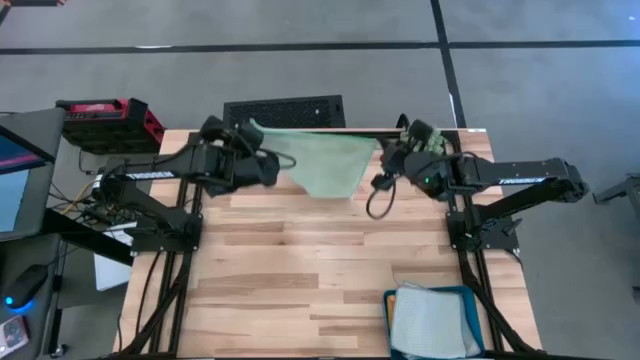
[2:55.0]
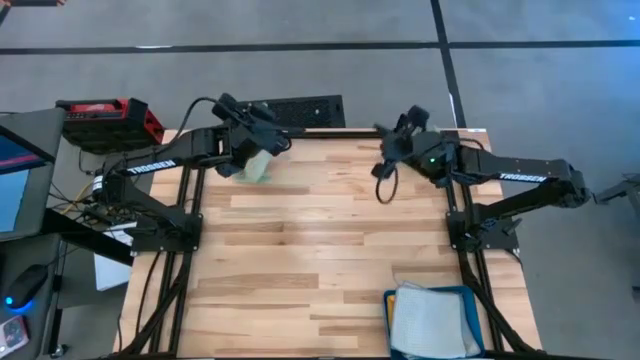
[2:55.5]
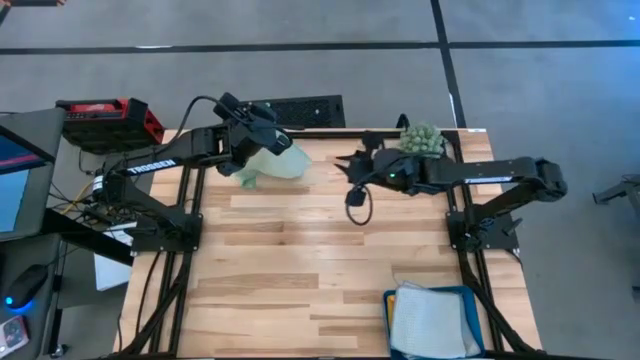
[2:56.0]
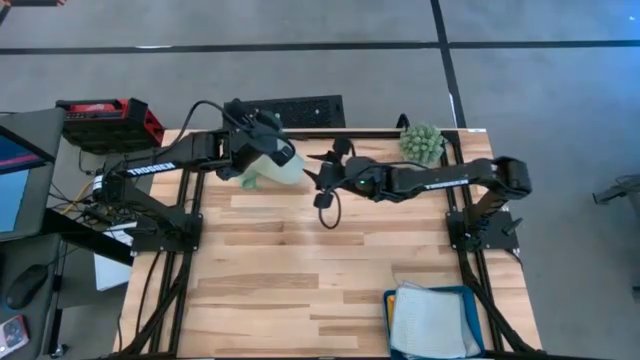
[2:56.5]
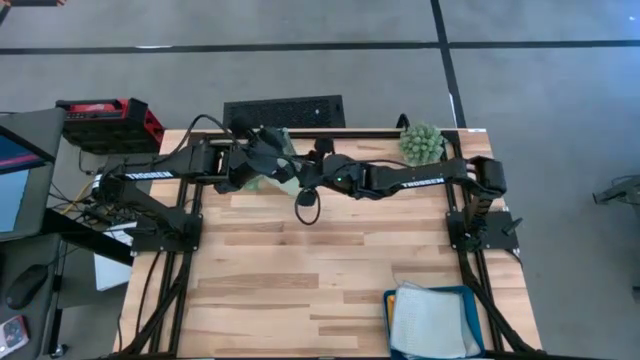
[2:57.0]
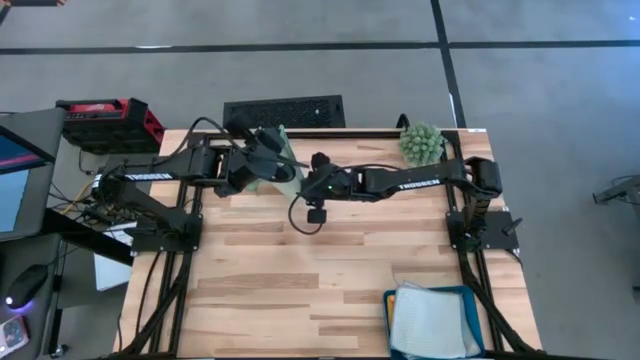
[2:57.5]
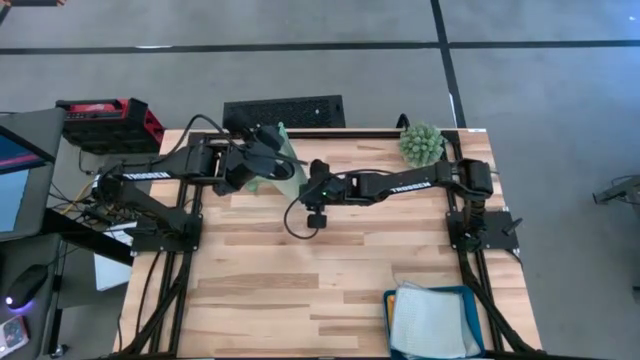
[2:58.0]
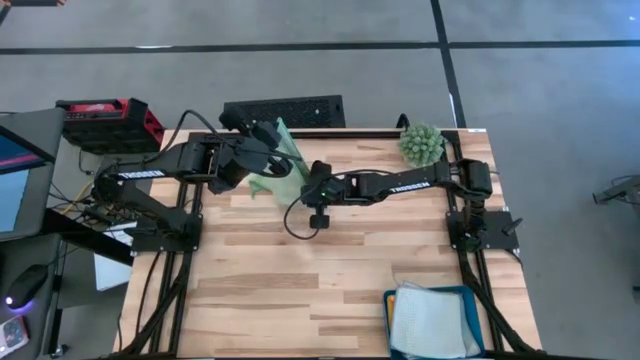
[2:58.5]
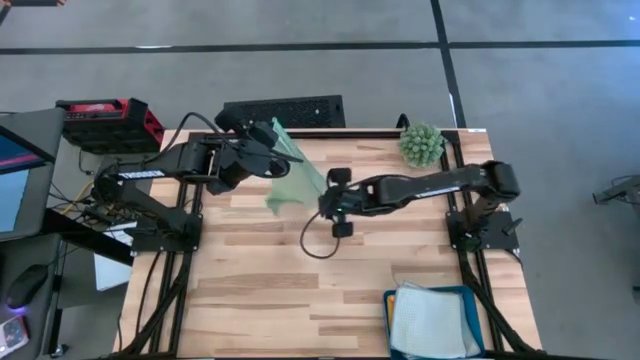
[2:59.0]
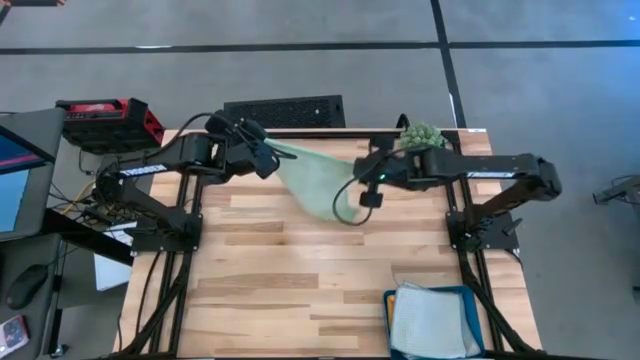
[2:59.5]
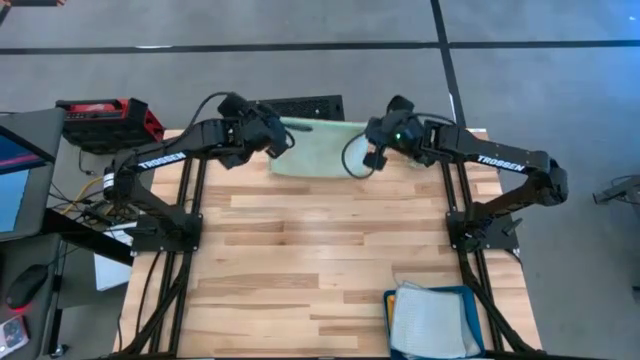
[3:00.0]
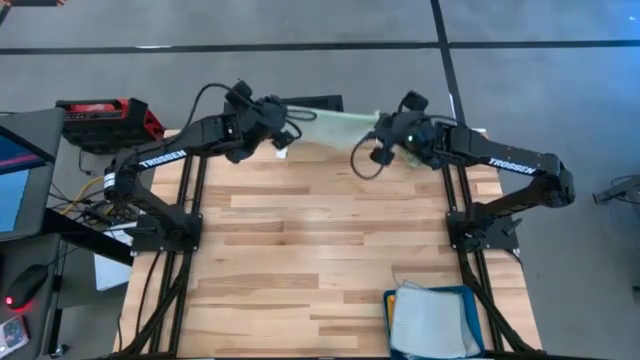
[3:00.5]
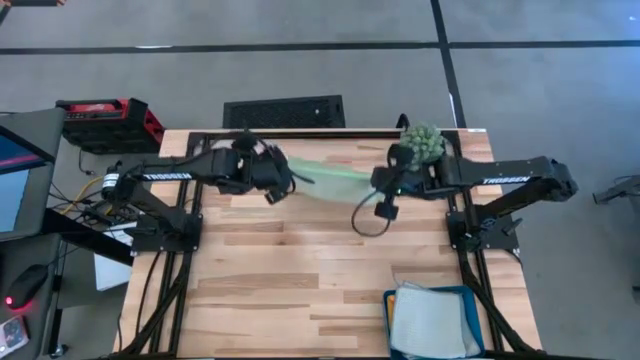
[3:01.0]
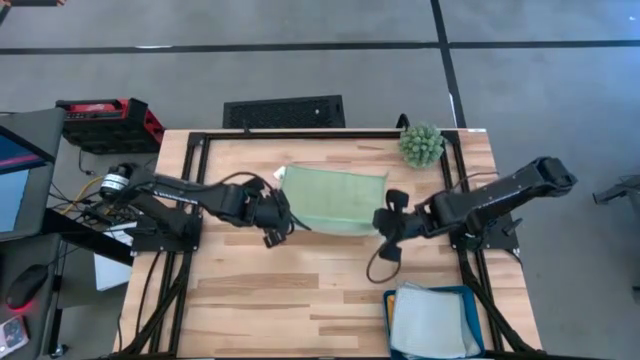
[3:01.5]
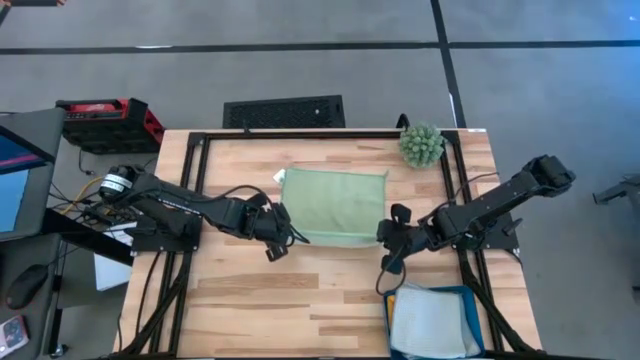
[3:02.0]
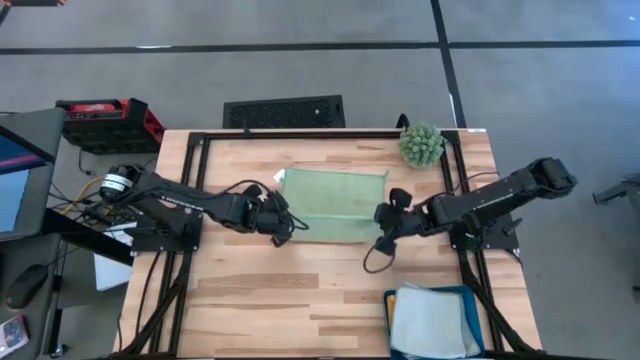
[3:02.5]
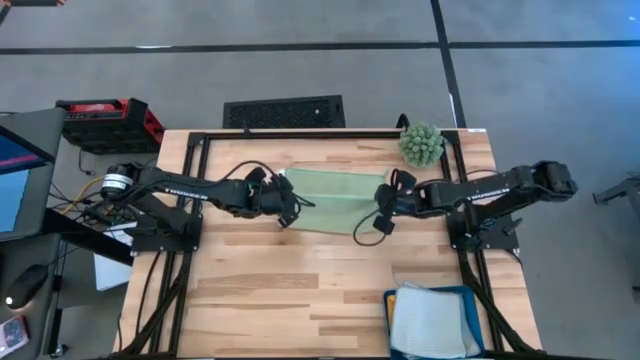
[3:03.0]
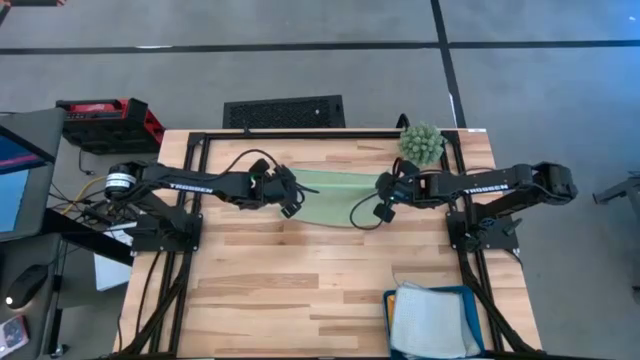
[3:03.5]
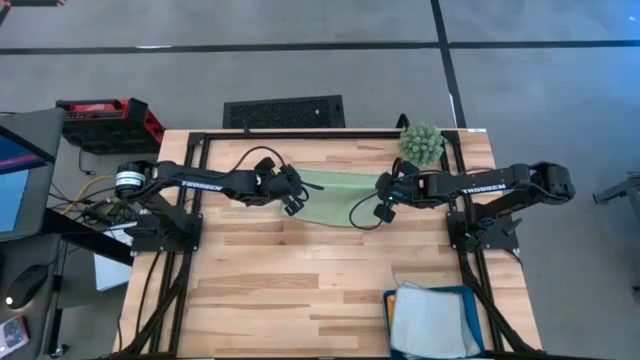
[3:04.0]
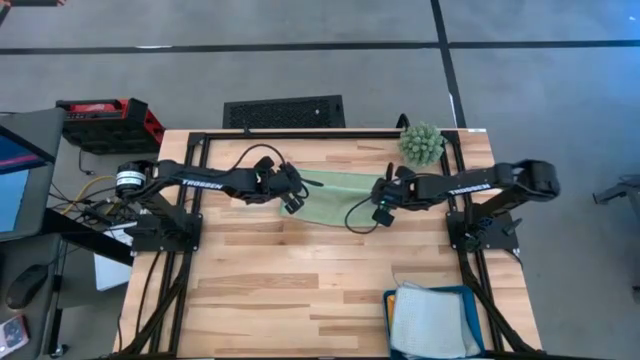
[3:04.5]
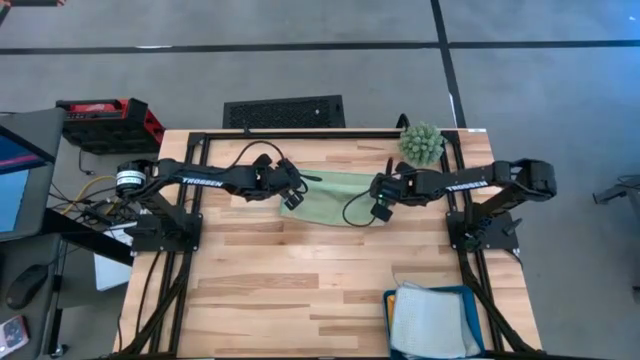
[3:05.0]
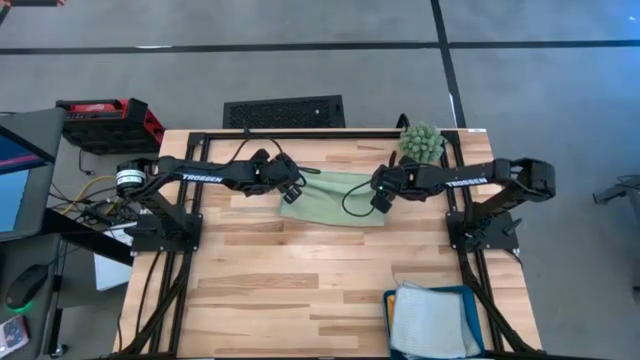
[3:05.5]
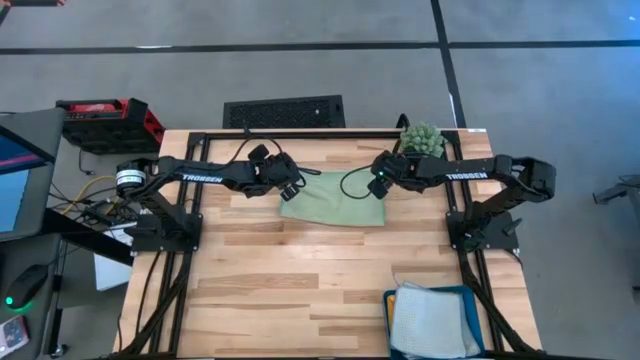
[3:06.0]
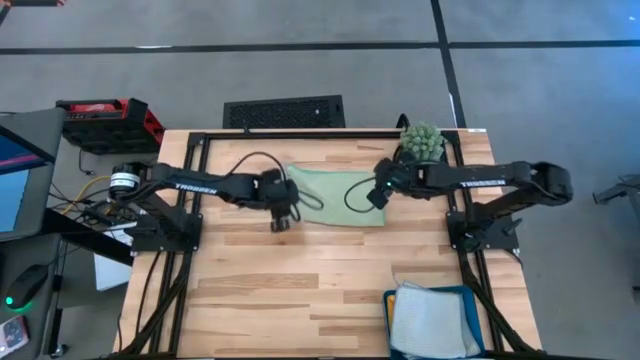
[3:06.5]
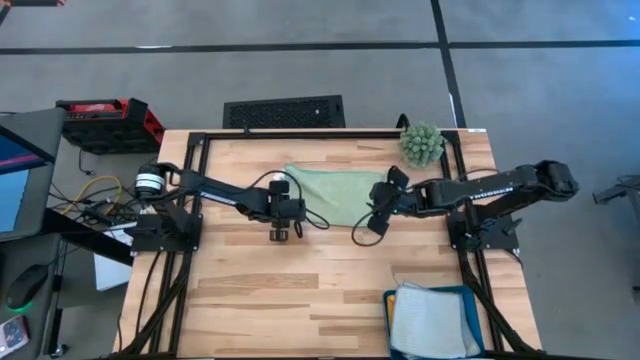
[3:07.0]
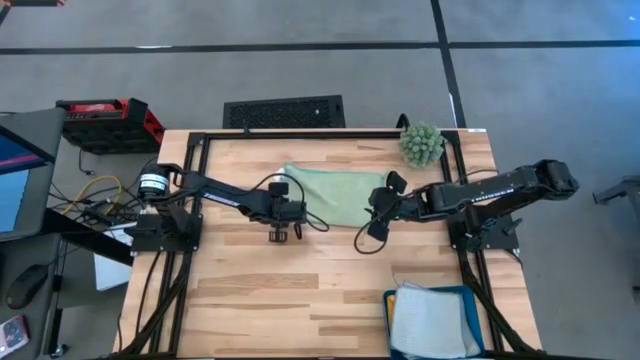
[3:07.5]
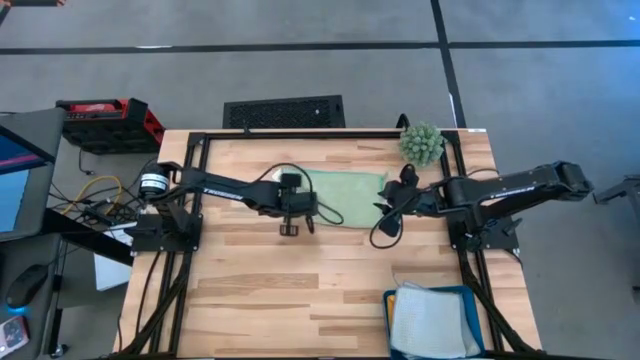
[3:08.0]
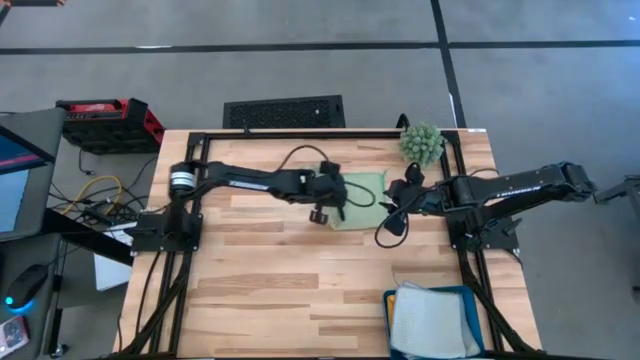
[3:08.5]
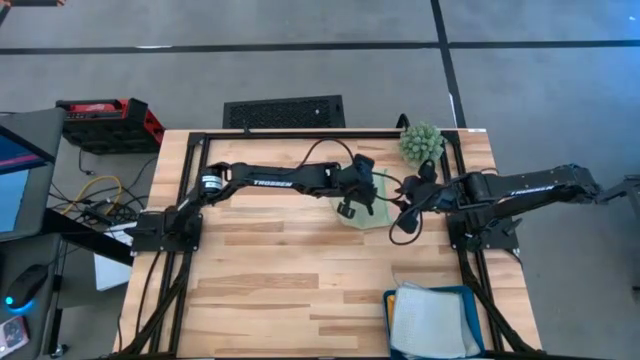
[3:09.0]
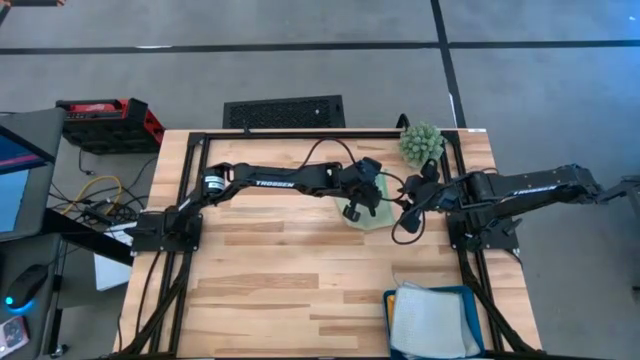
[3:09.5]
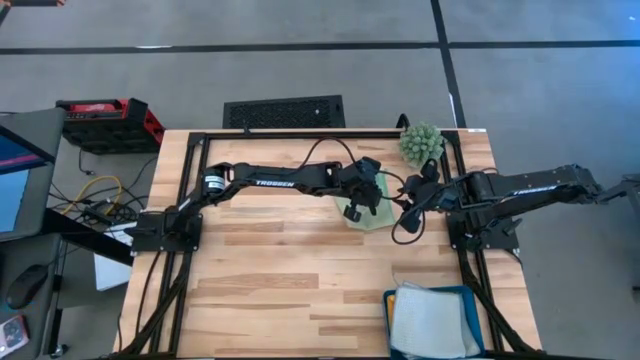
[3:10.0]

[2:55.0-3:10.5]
Task: Fold microfiber towels
Fold the green towel

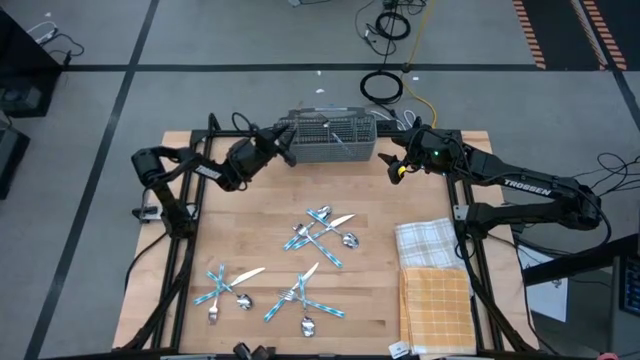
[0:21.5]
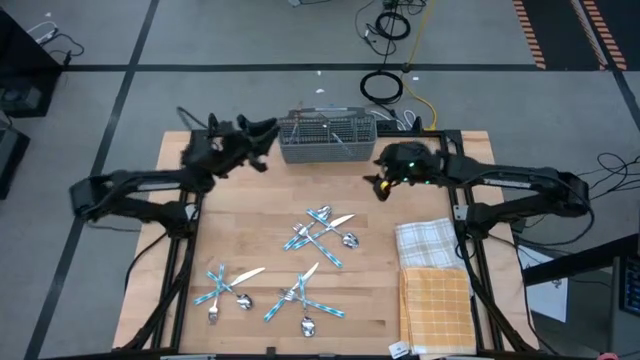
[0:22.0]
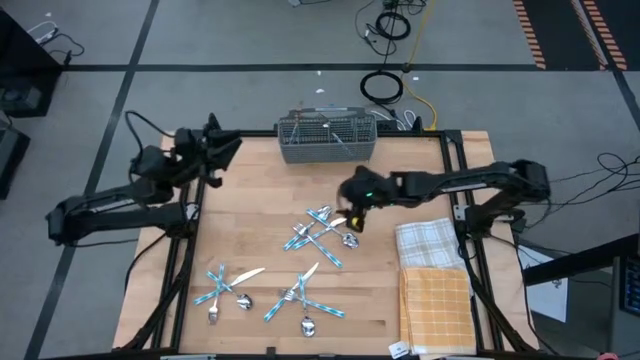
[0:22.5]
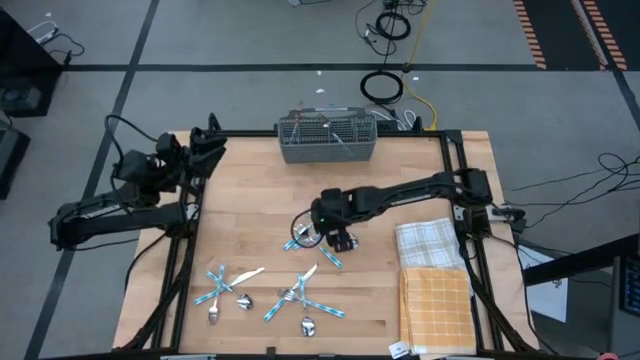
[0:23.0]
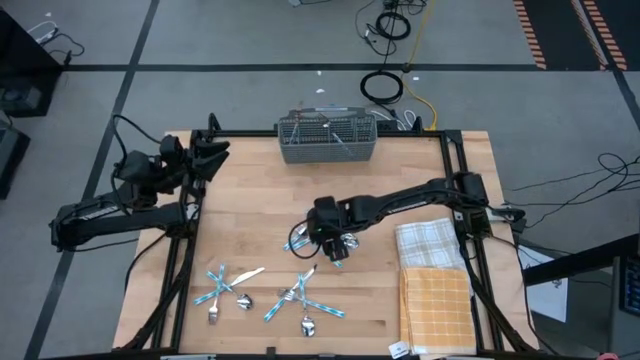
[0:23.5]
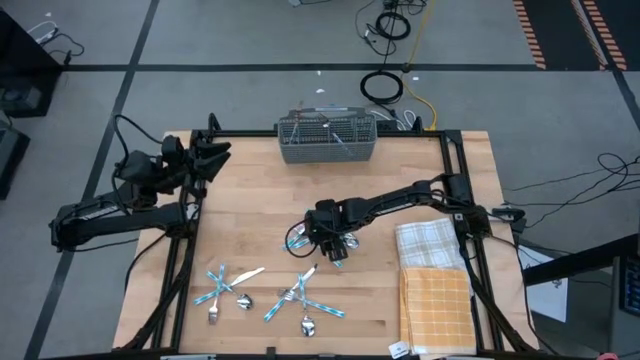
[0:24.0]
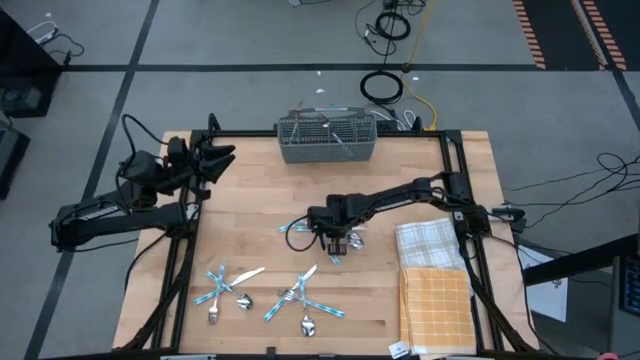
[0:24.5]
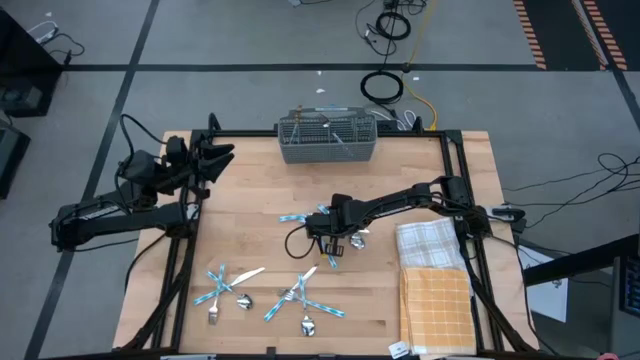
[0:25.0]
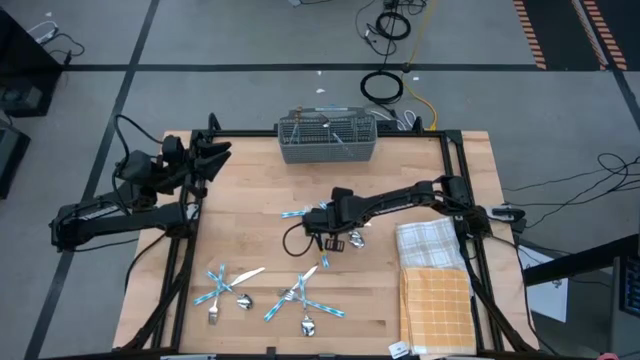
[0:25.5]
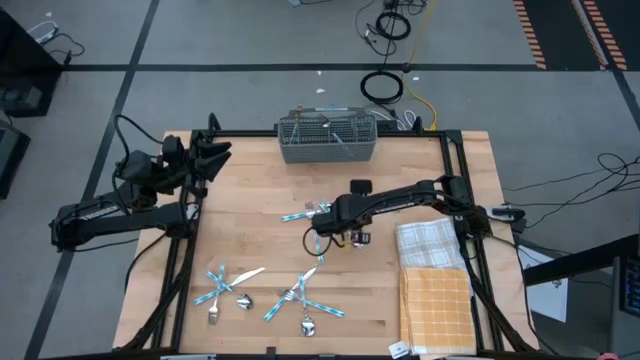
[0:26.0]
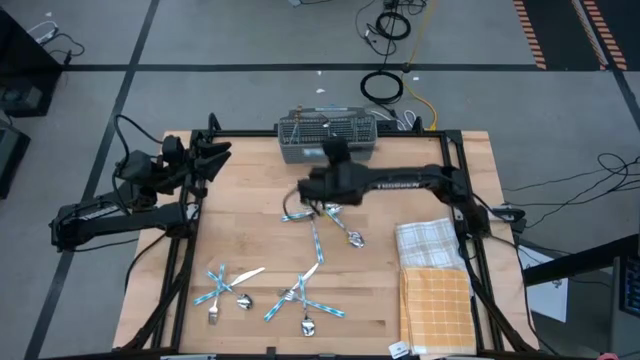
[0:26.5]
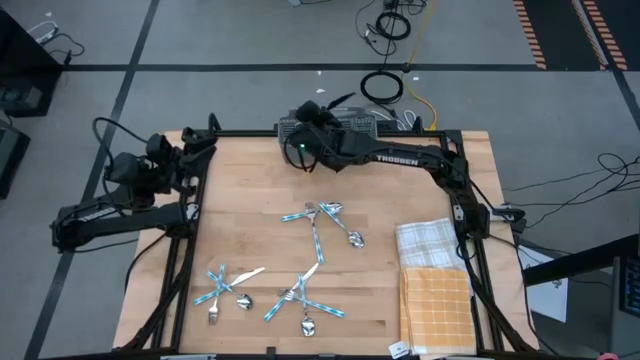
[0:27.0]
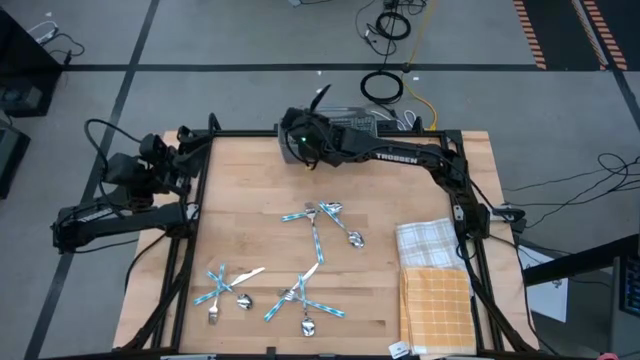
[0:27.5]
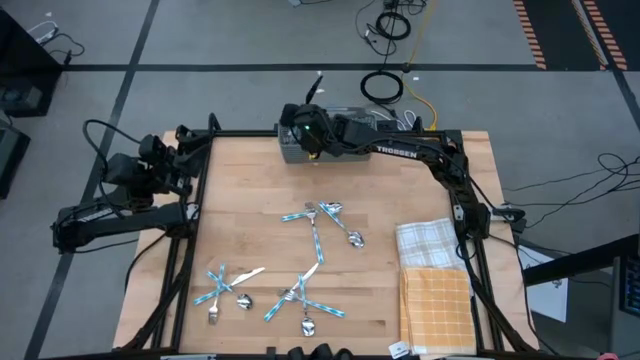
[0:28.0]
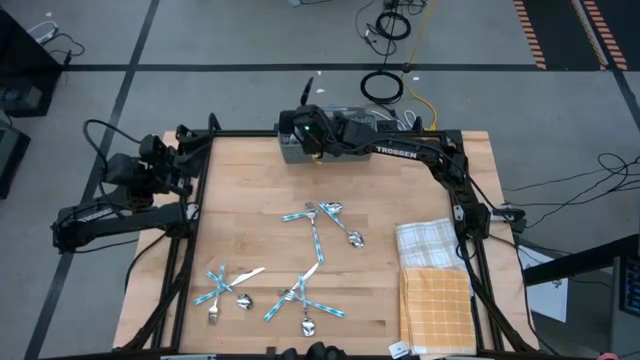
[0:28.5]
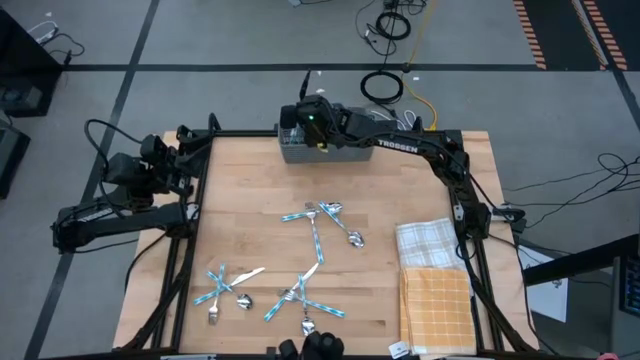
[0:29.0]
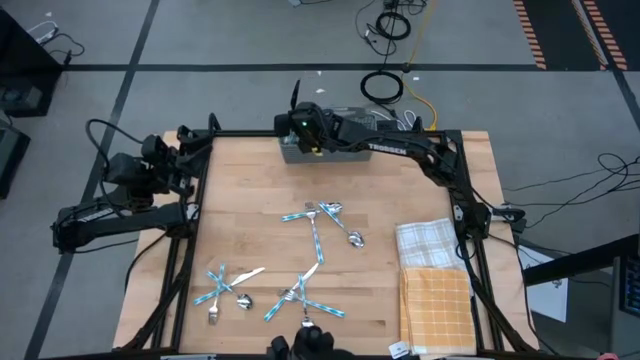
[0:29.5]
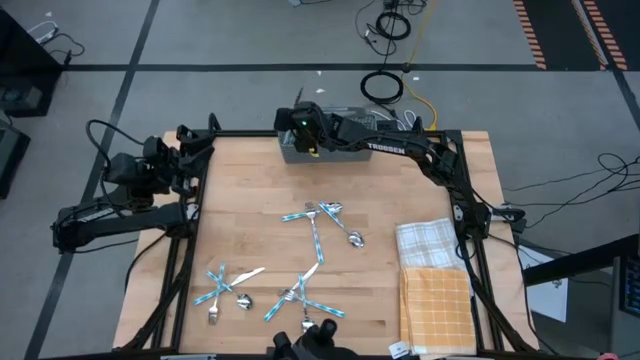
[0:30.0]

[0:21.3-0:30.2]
Task: Sort silverware
Put the table knife into the silverware rack
